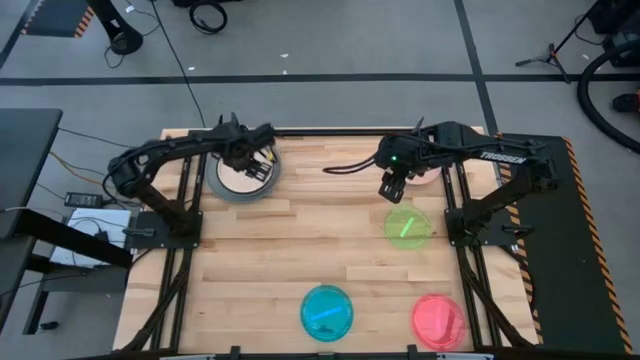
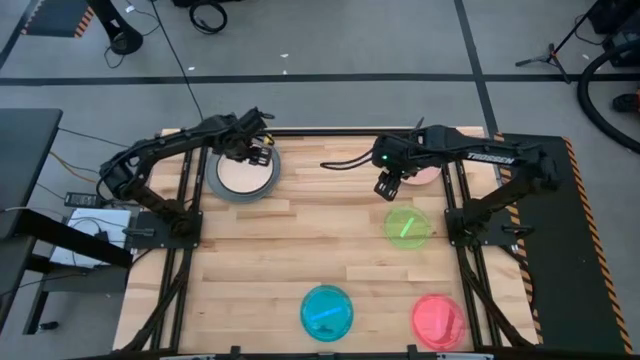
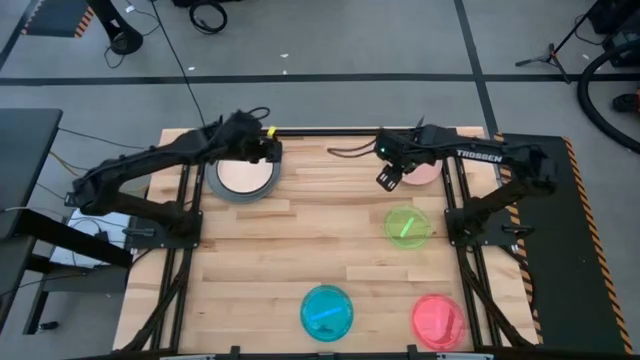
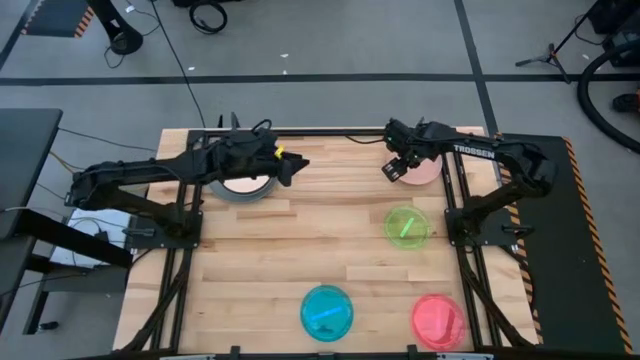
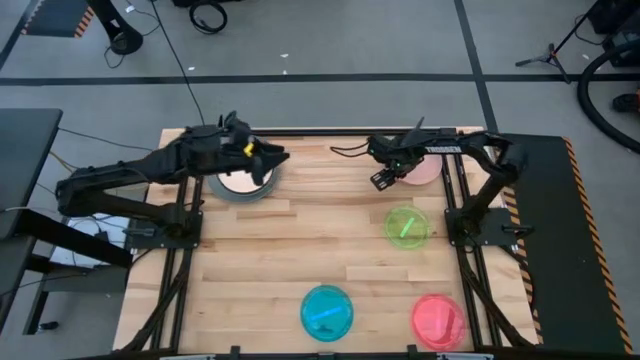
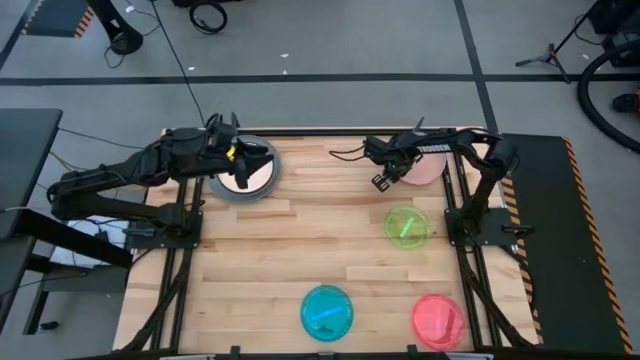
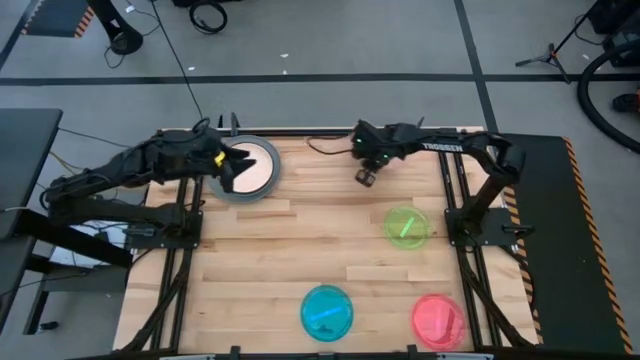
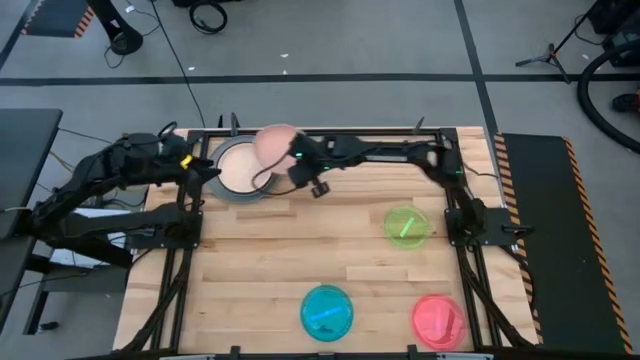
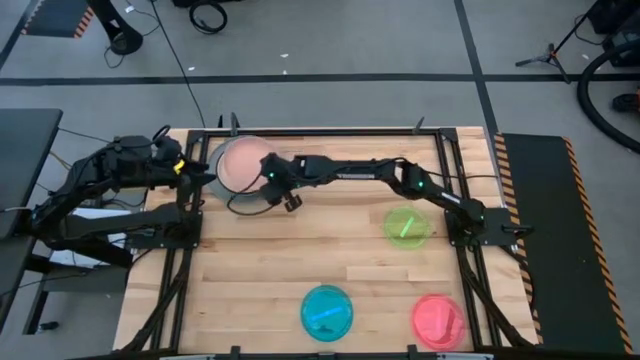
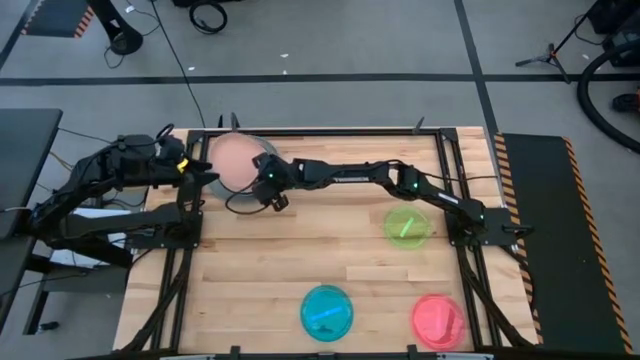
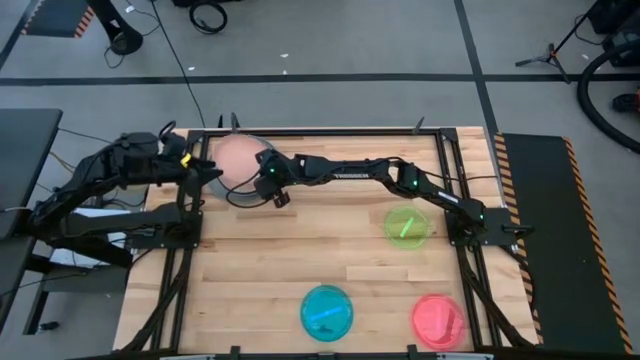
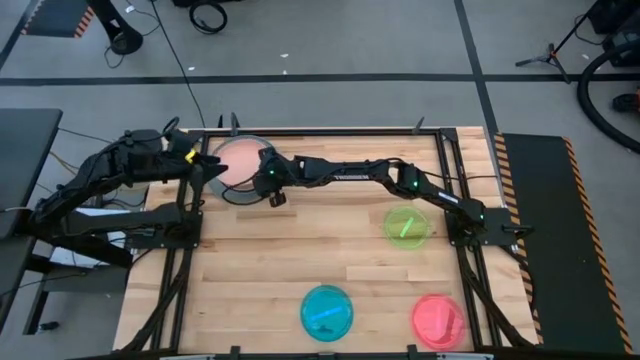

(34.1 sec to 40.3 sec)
Task: Stack plastic plates
Stack the light pink plate on the orange plate

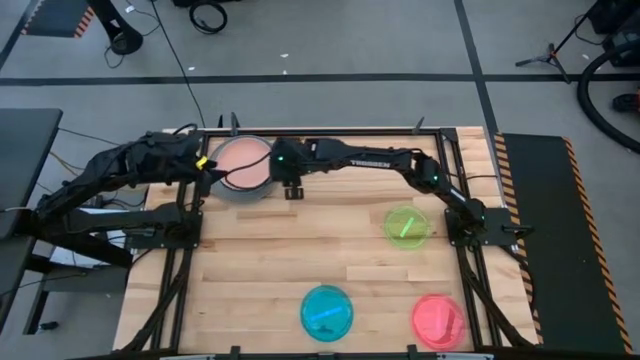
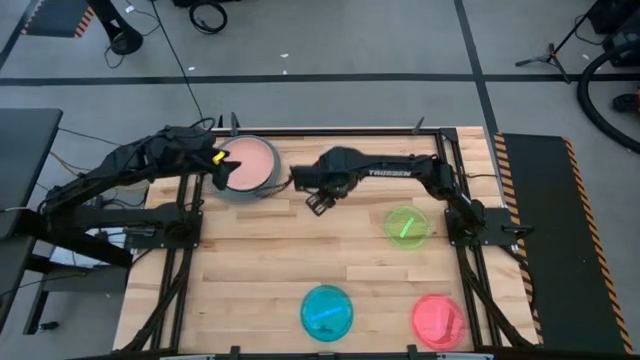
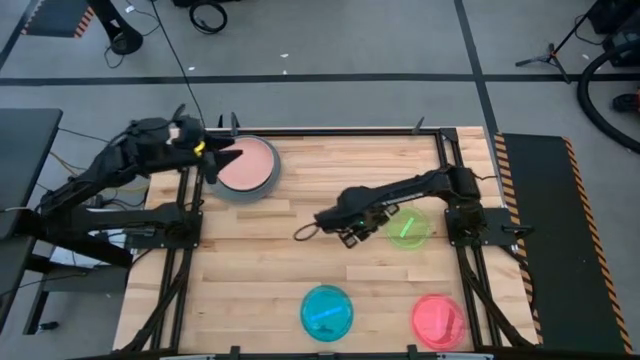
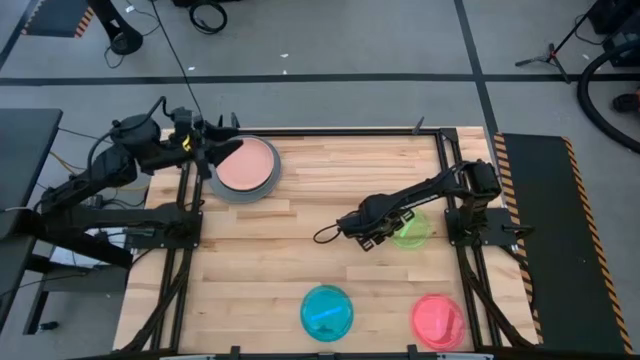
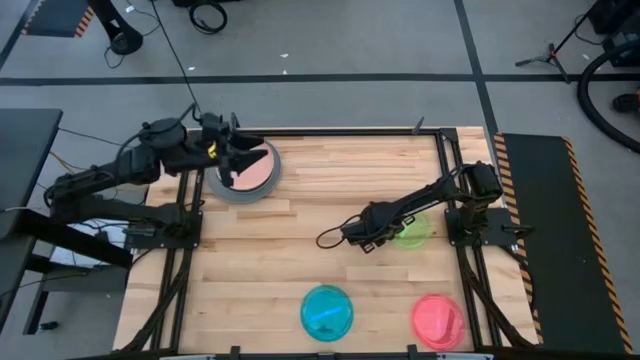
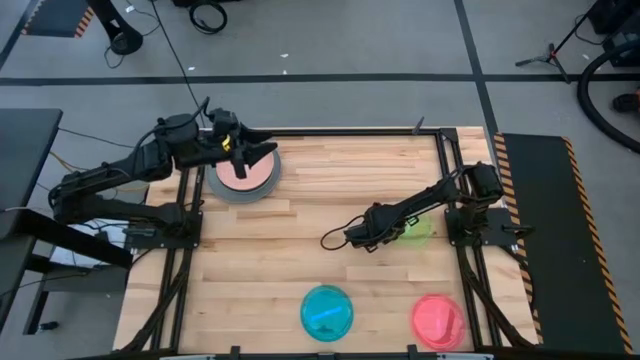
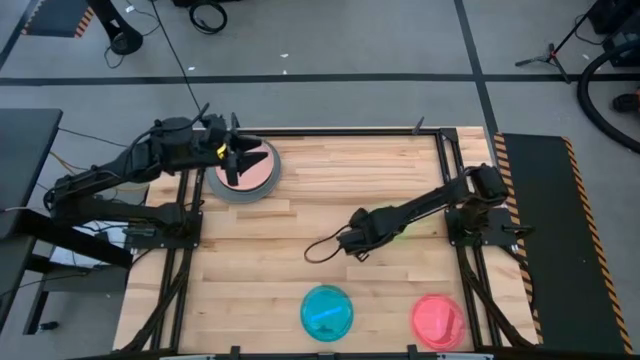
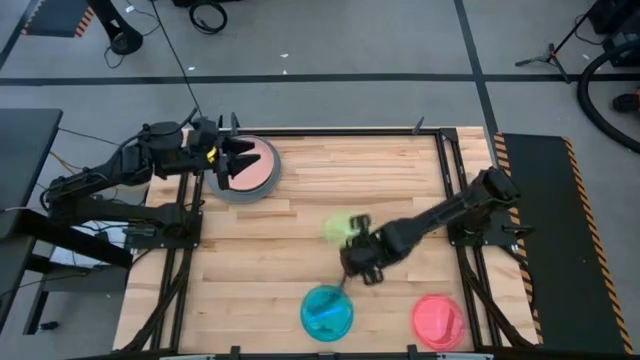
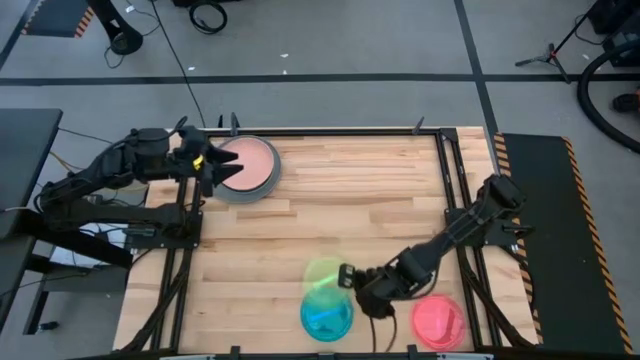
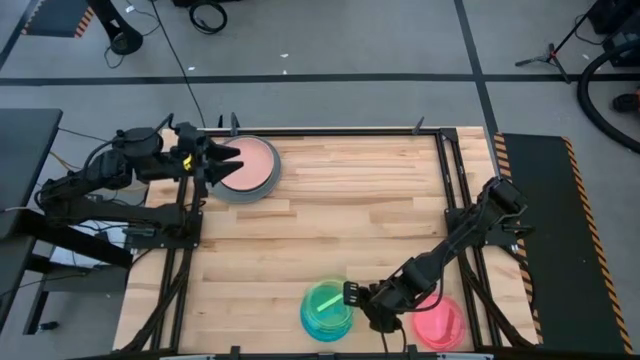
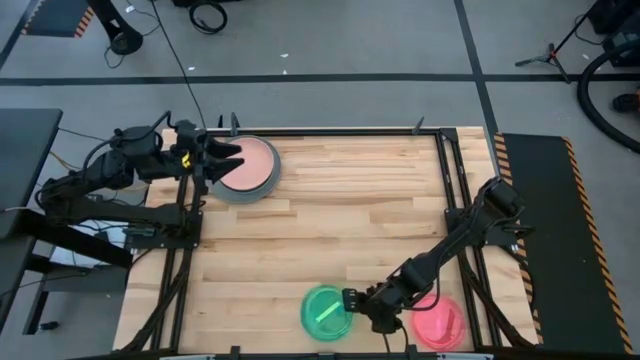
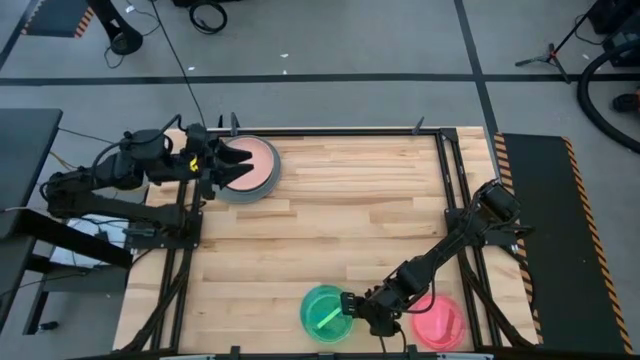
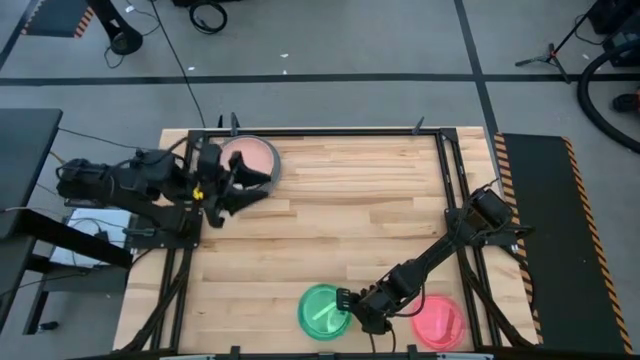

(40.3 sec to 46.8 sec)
Stack the green plate on the blue plate

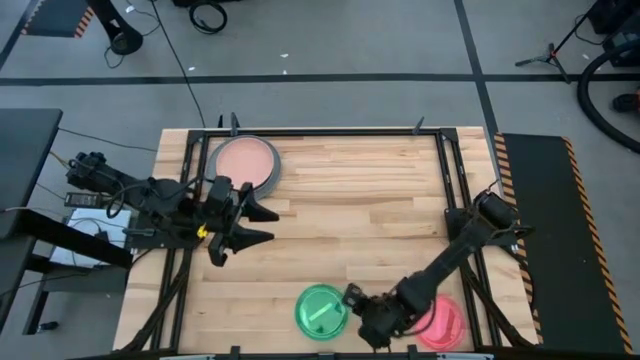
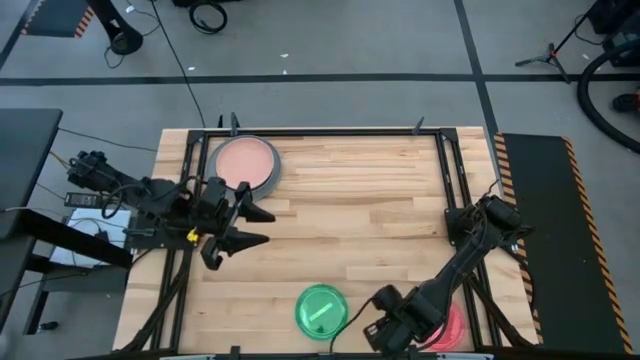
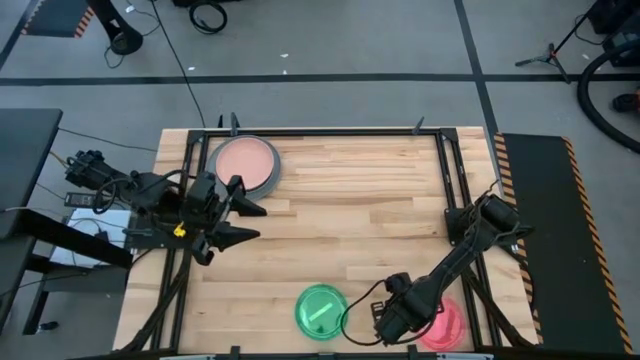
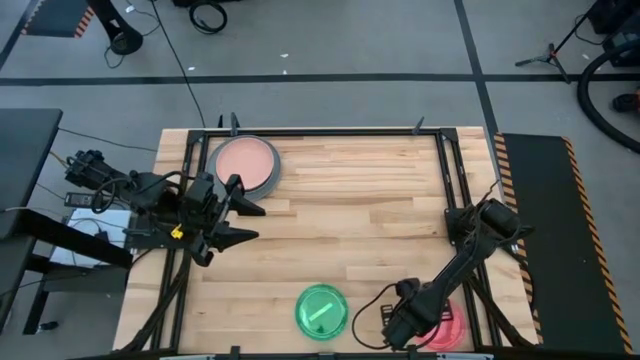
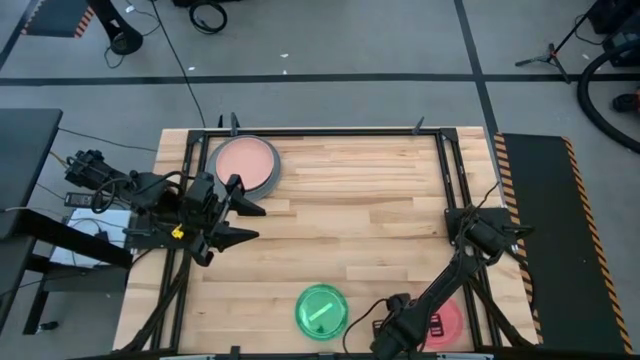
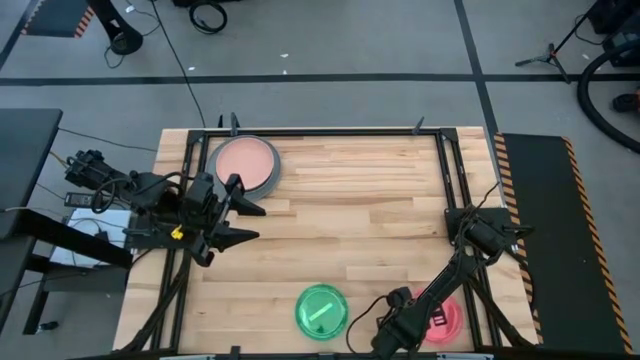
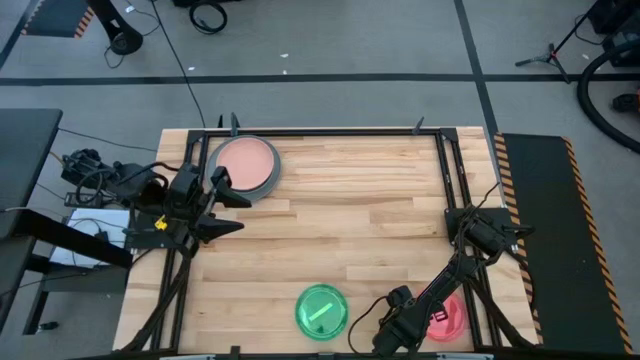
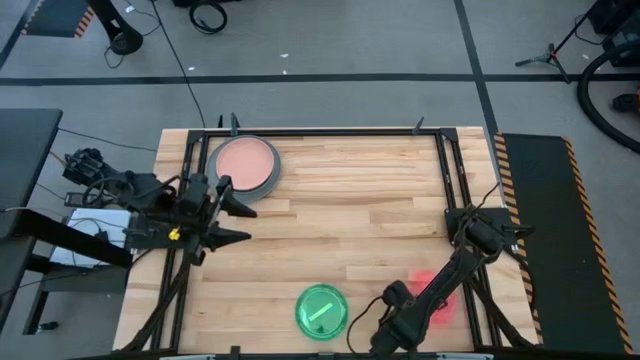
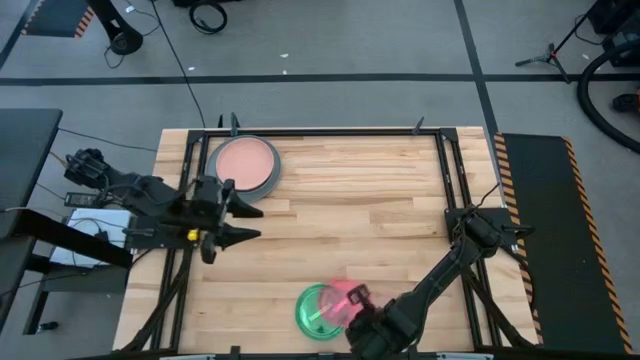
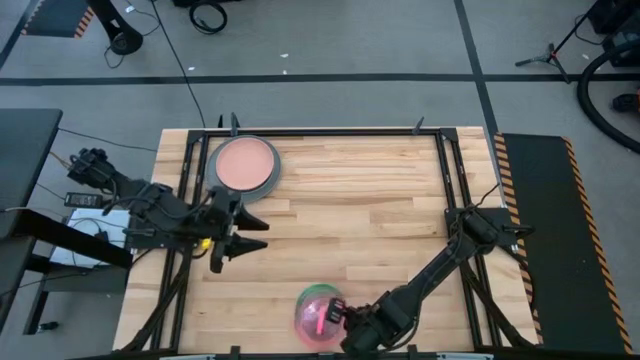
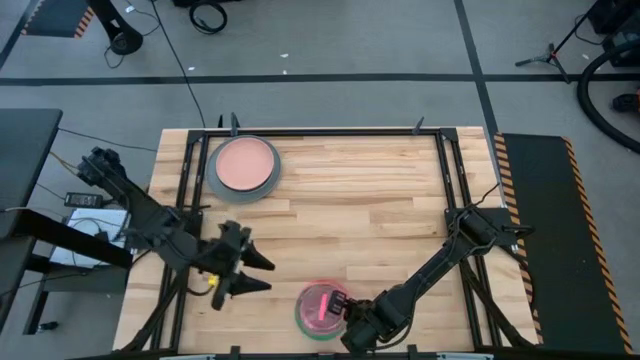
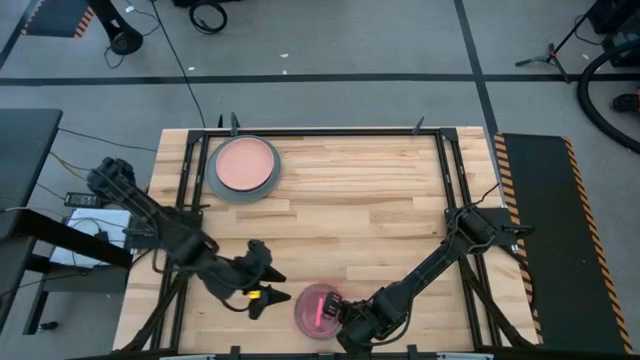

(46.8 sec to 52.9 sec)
Stack the pink plate on the green plate

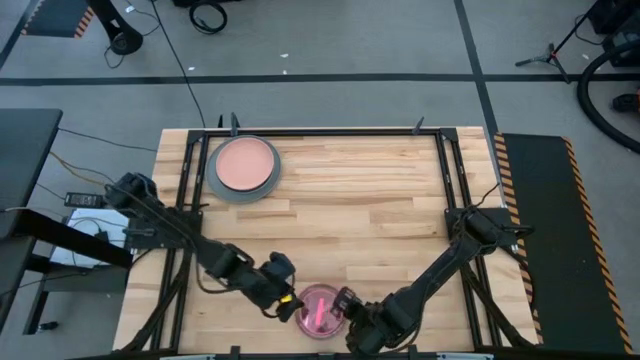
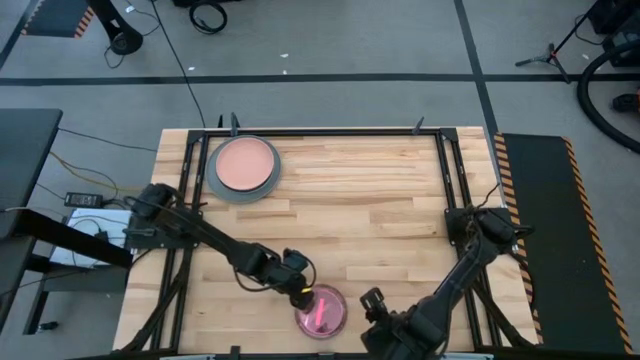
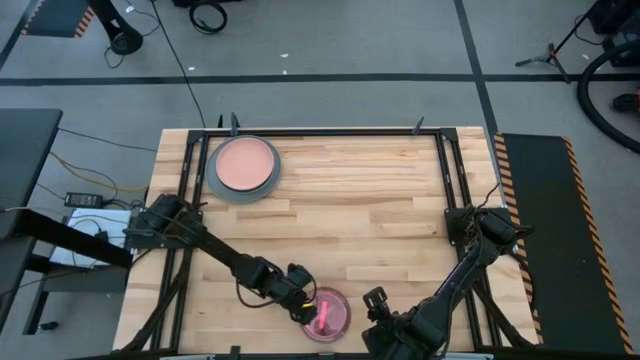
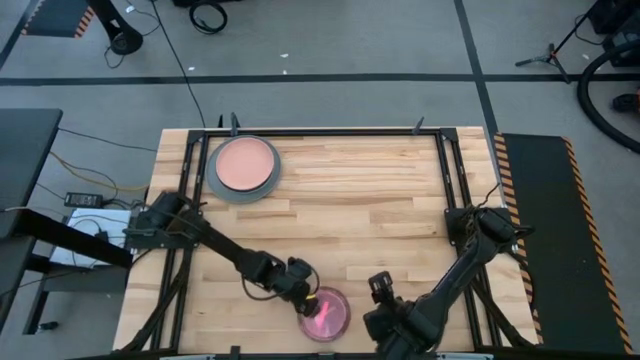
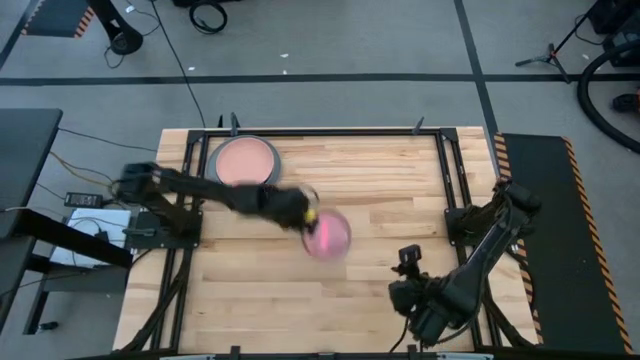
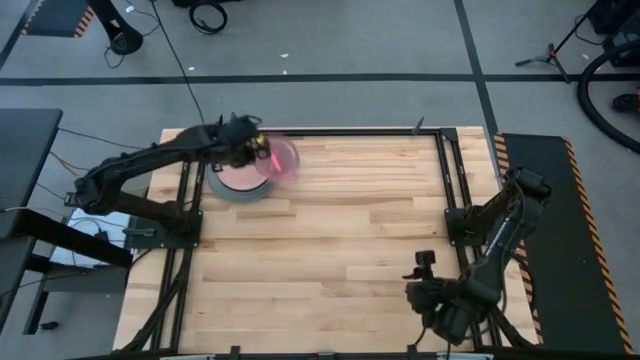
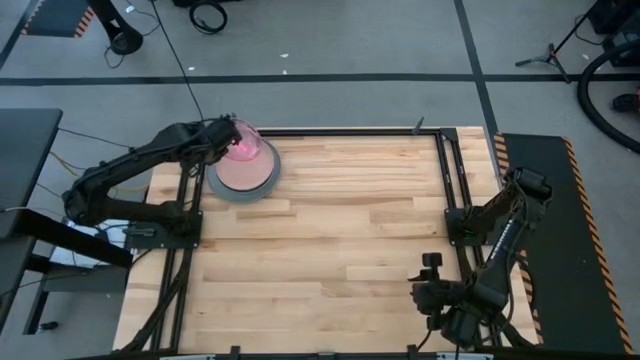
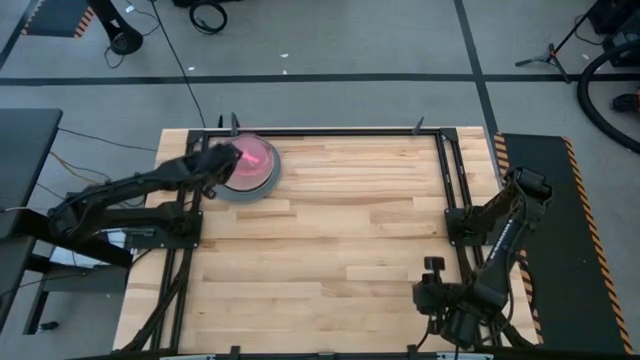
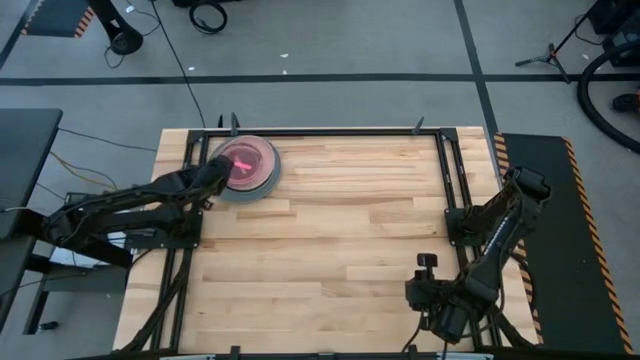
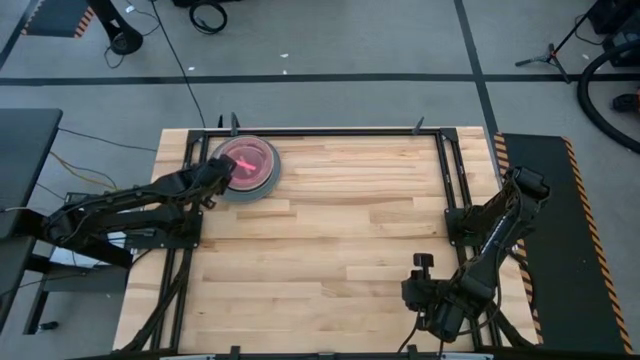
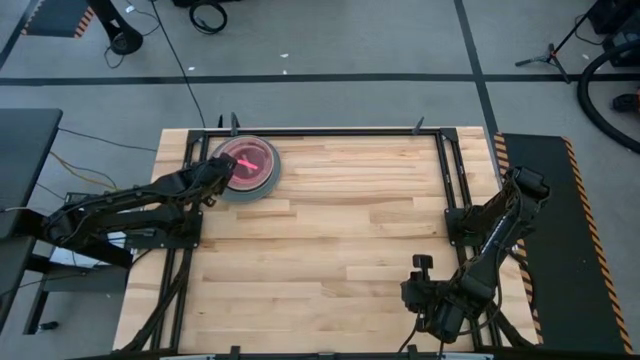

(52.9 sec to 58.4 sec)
Stack the stacked plates on the light pink plate
